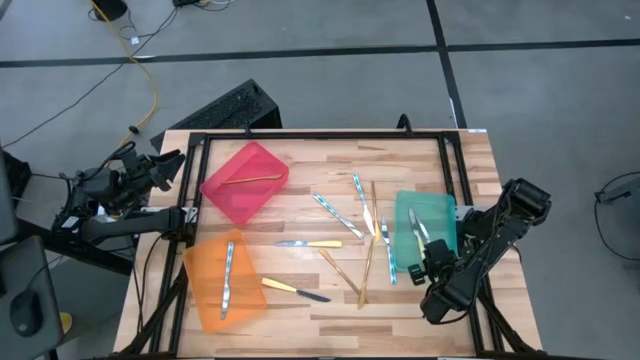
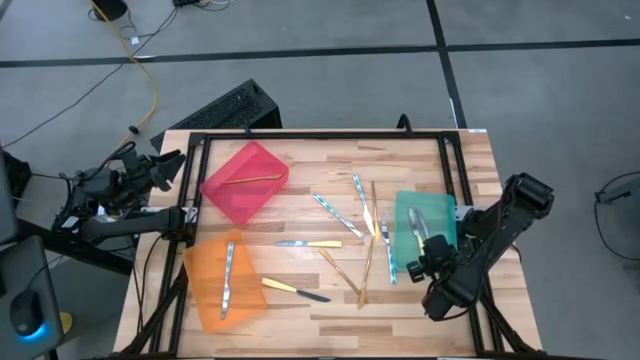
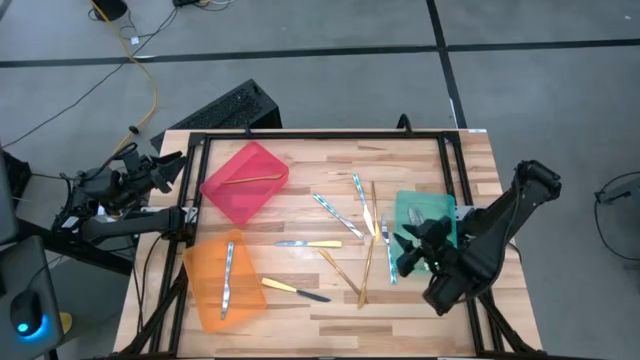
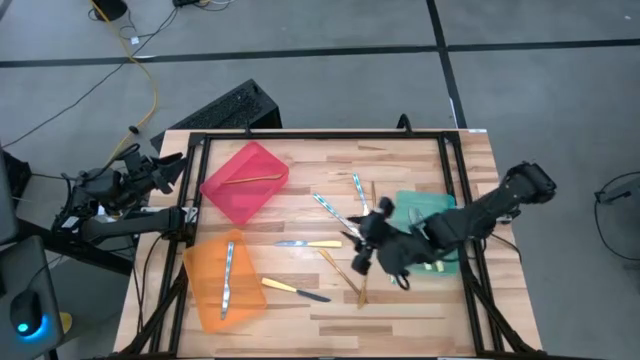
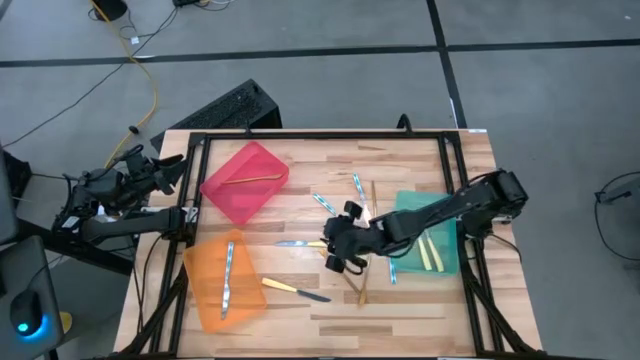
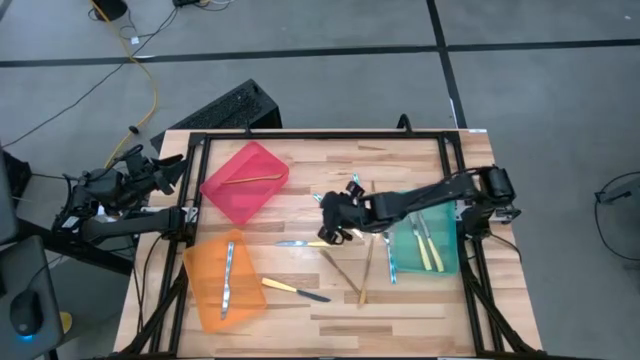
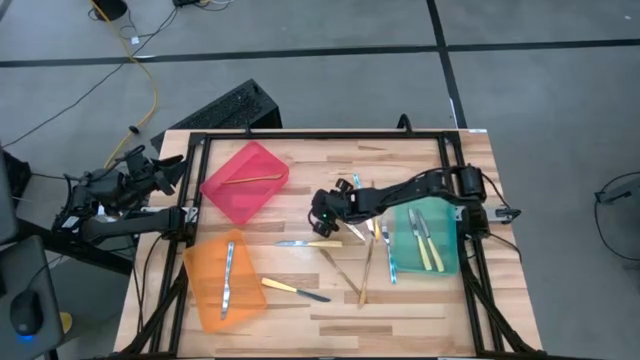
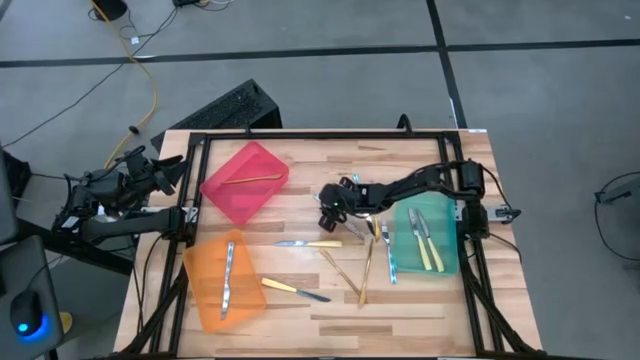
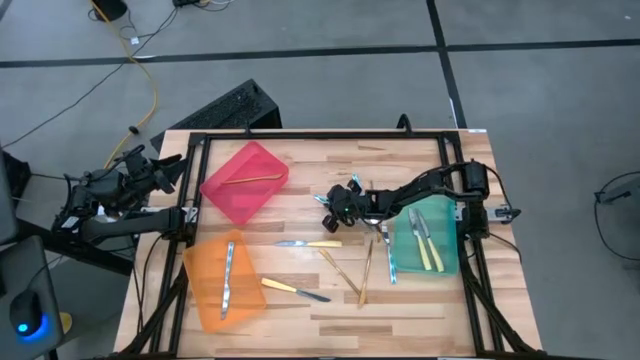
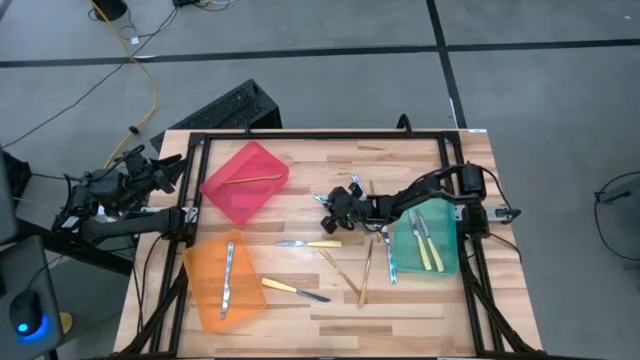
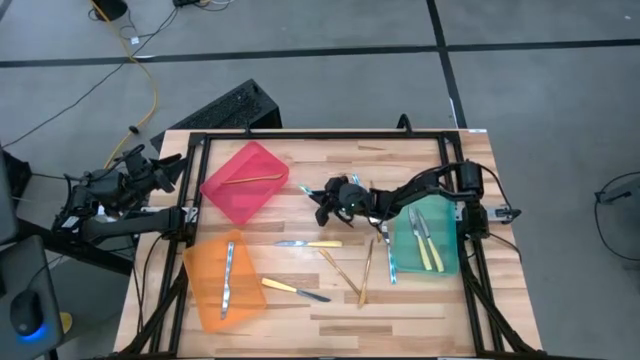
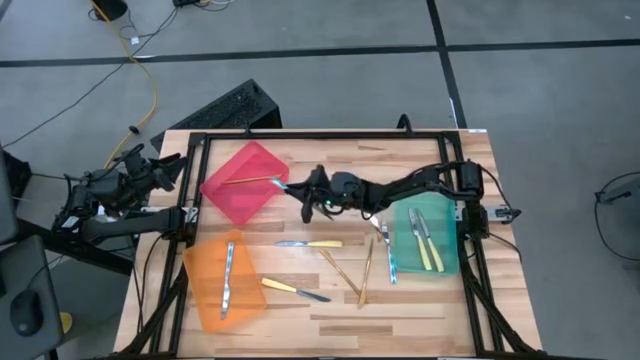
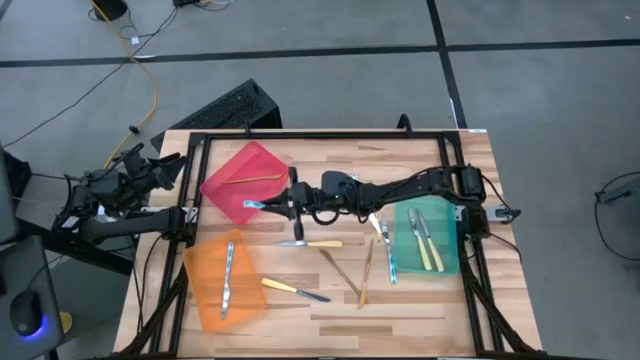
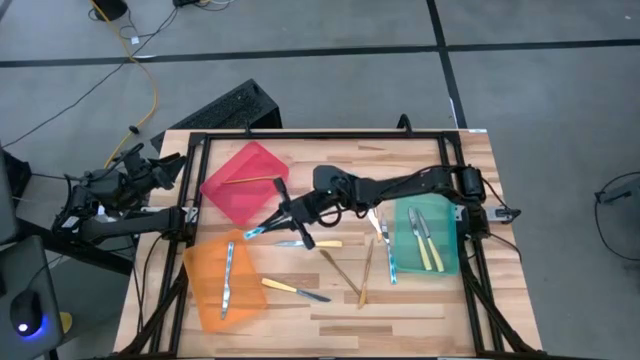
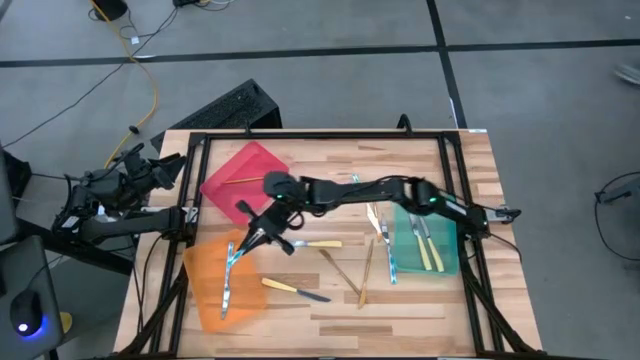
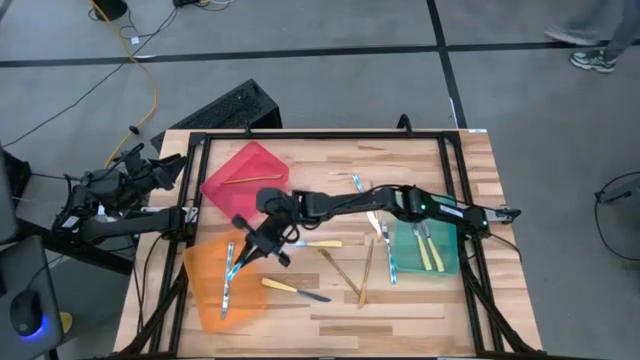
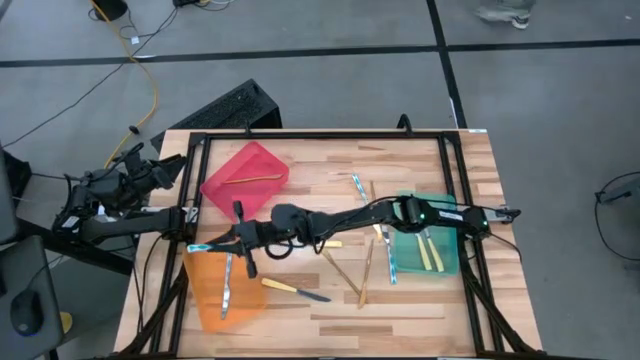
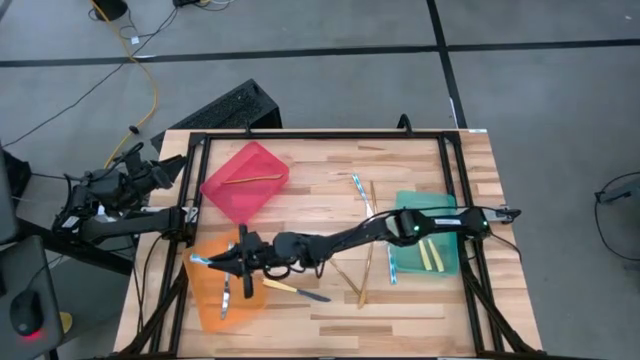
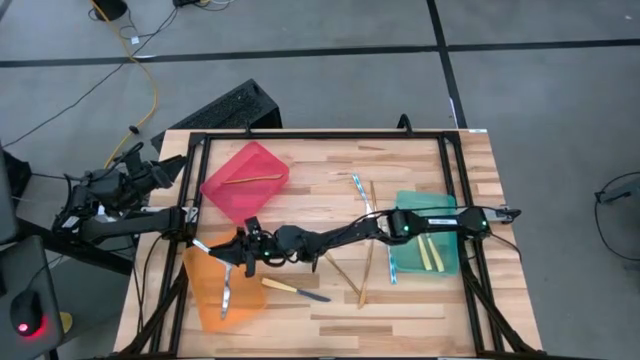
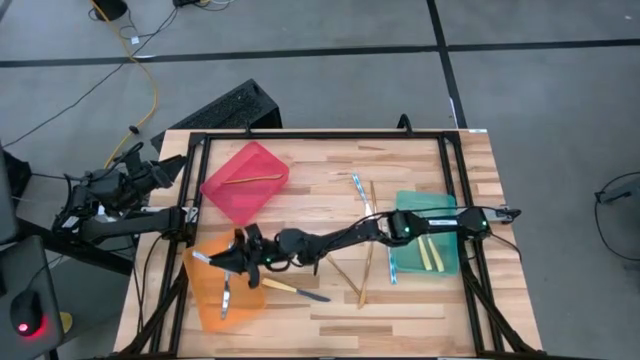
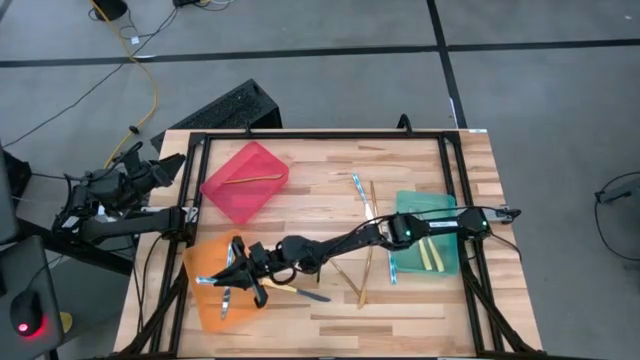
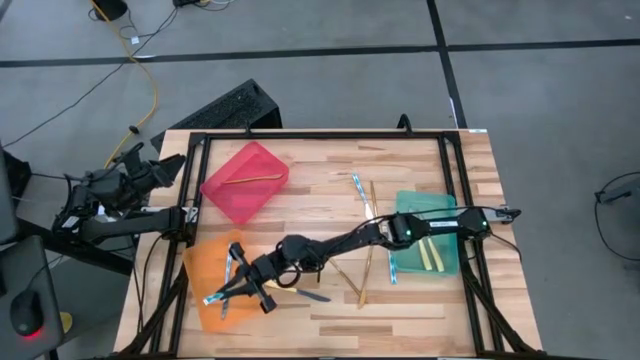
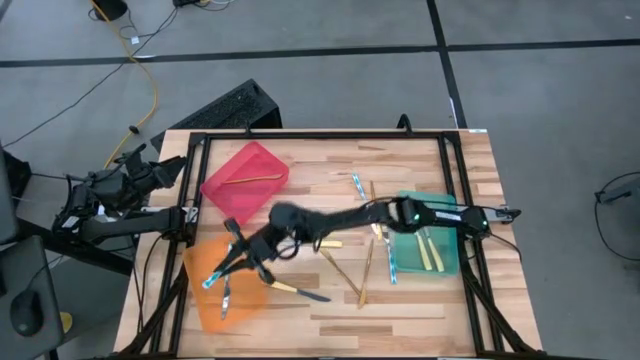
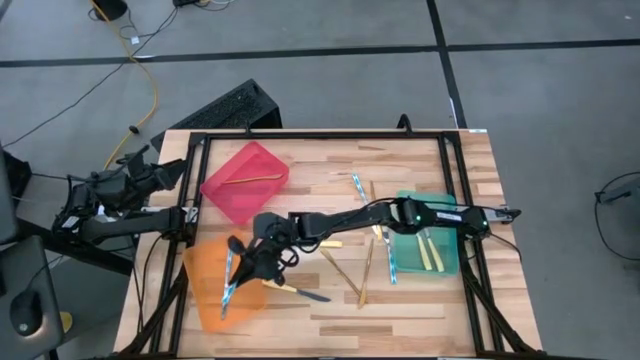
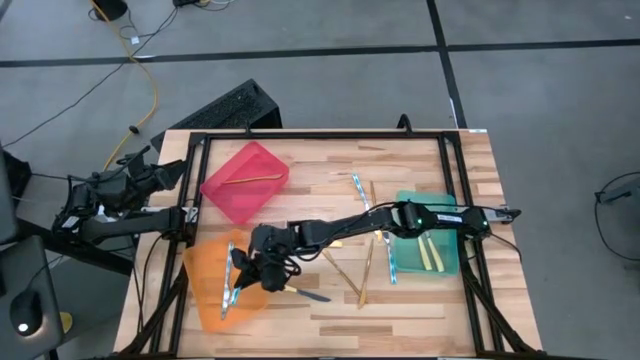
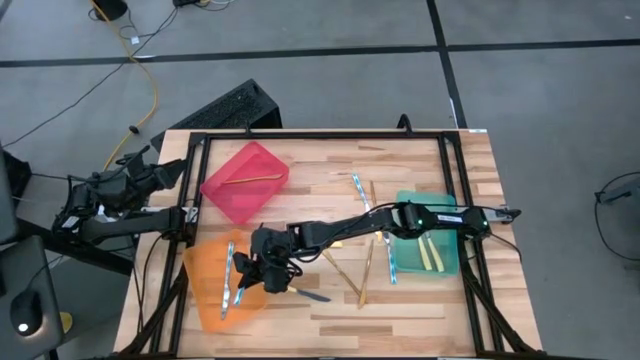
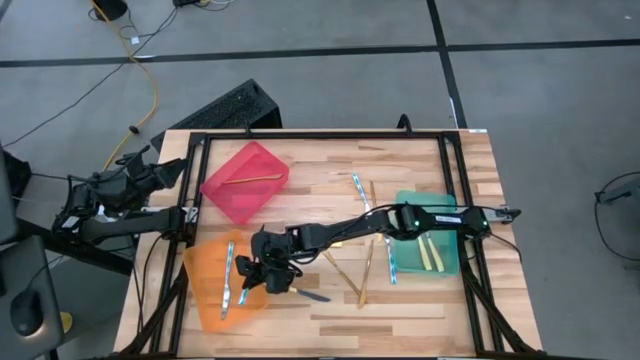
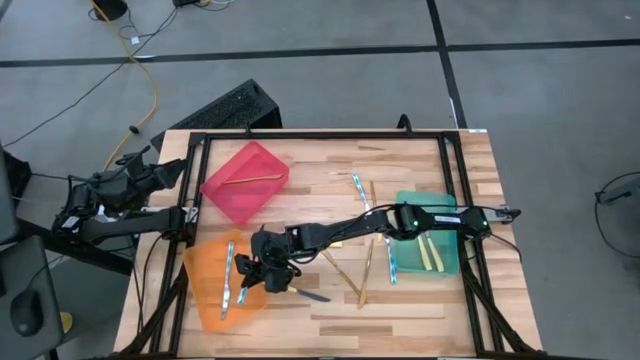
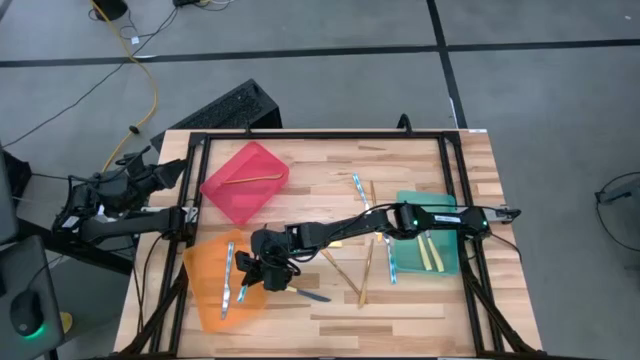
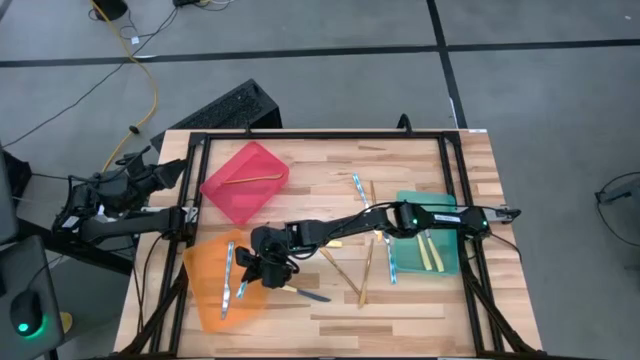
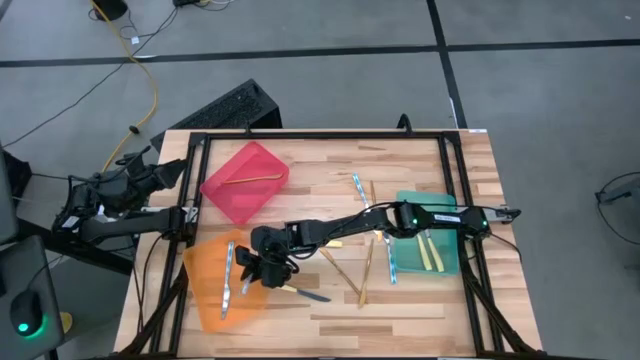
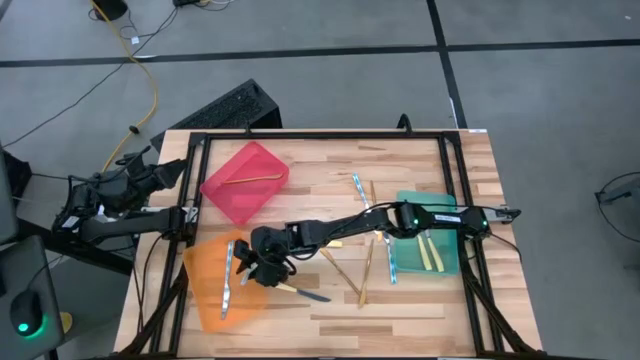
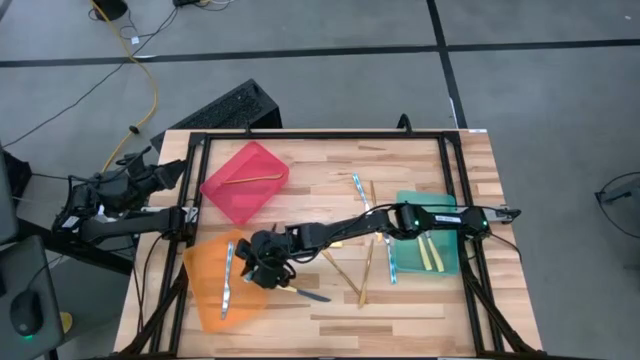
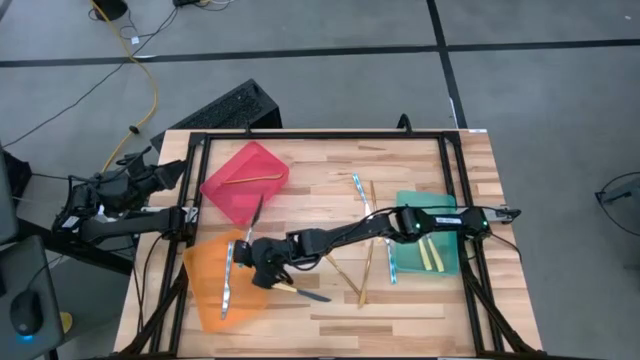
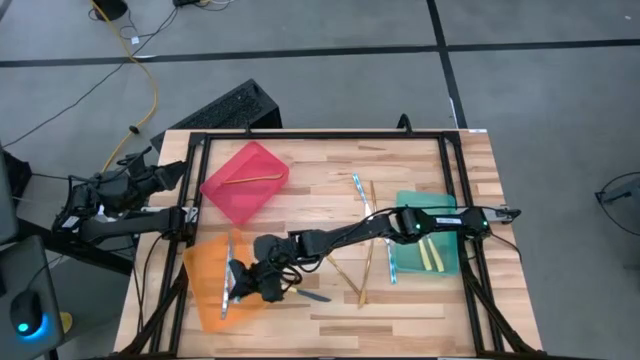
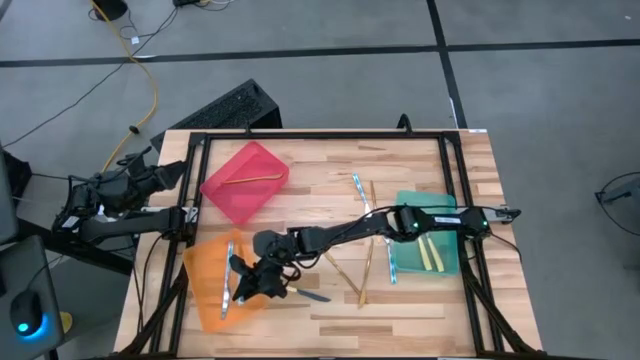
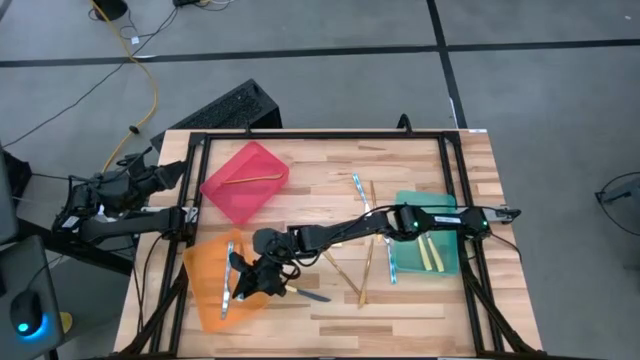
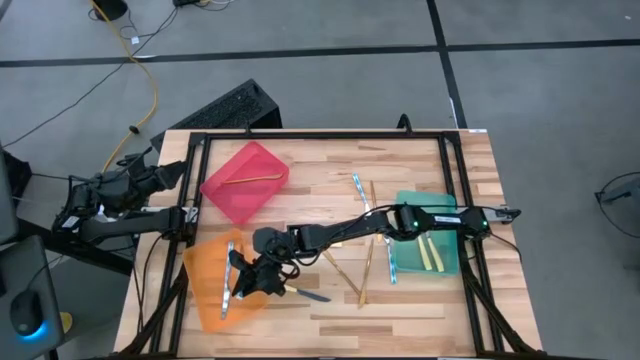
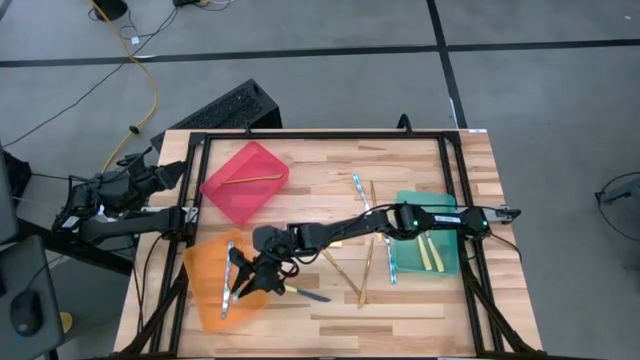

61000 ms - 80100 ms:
Task: Sort silverware by color (type)
Put the top left blue knife into the orange bin

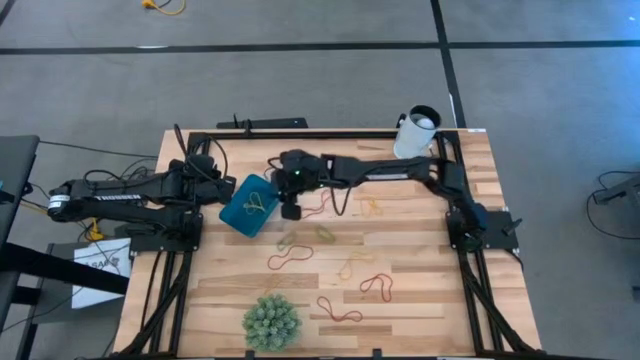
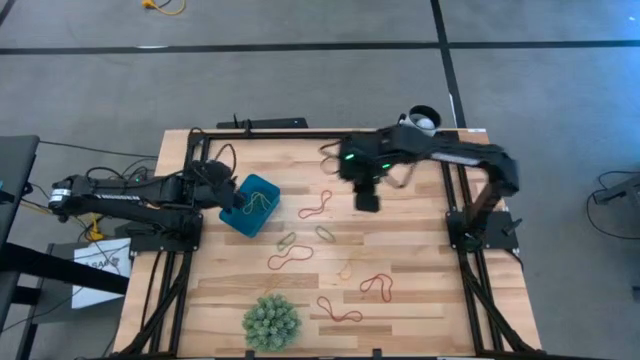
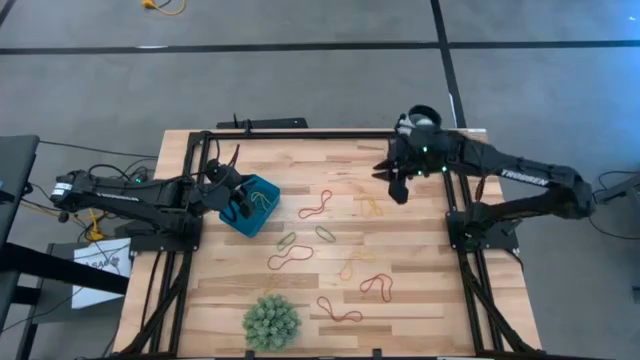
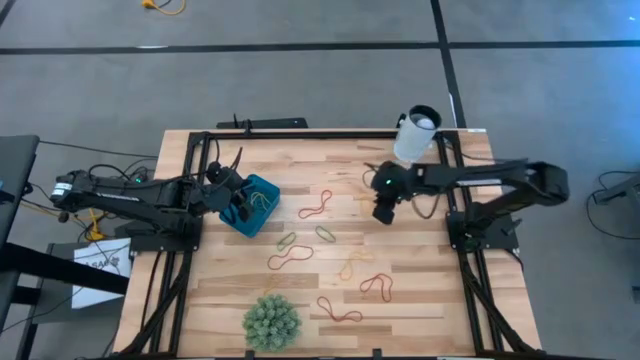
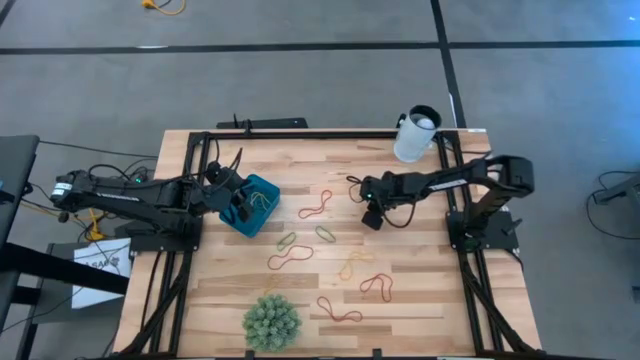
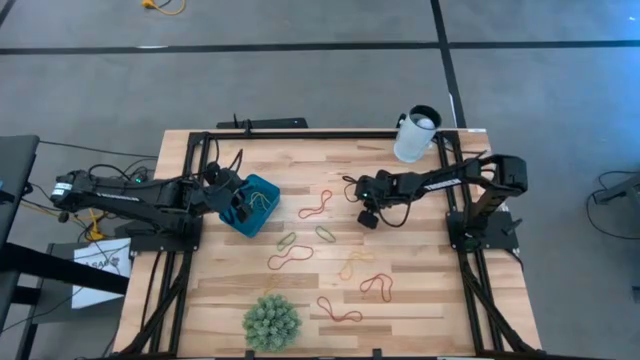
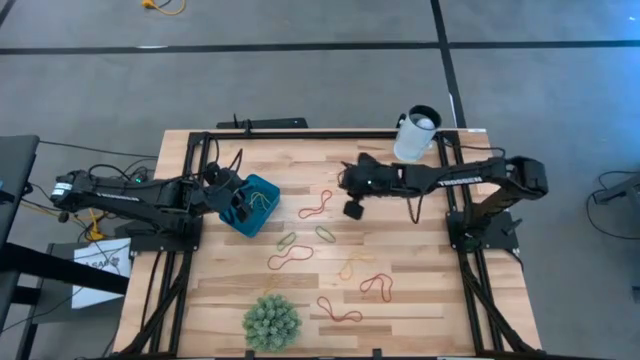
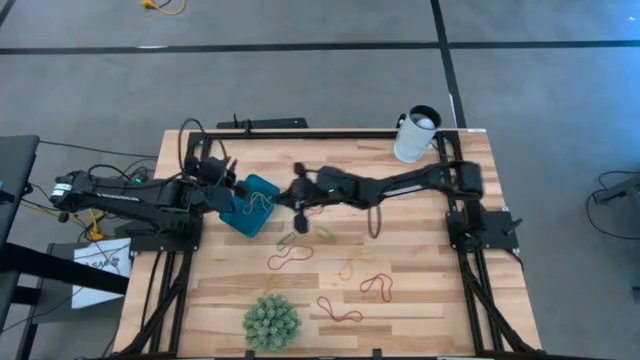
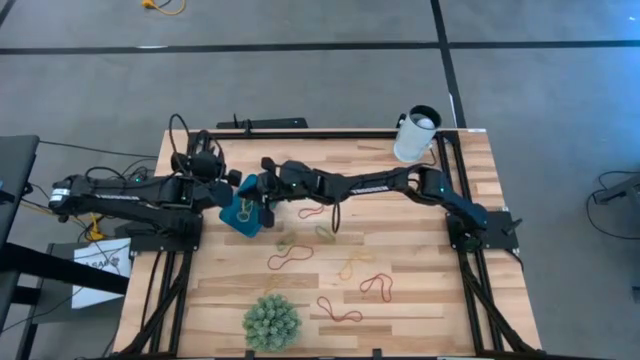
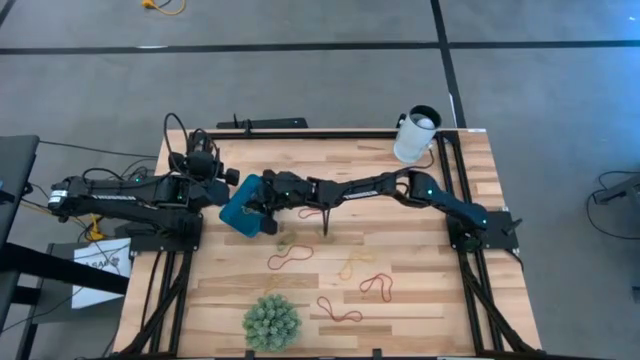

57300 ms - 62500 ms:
Task: Pick and place items into bin
Put the yellow rubber band into the blue bin
